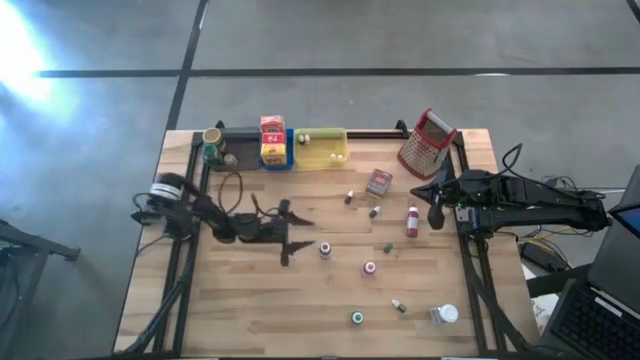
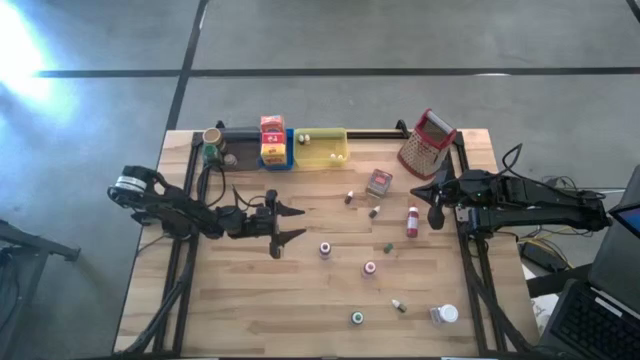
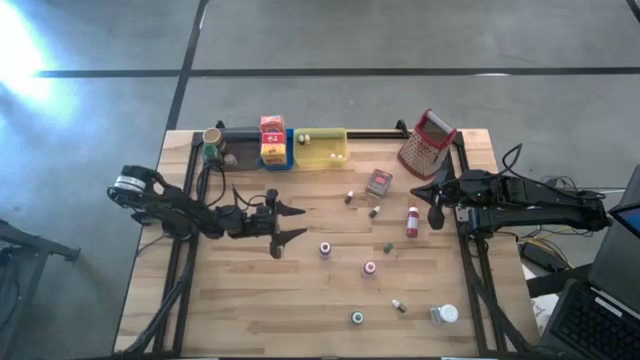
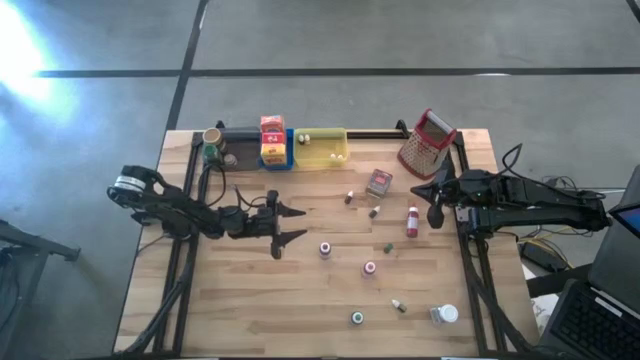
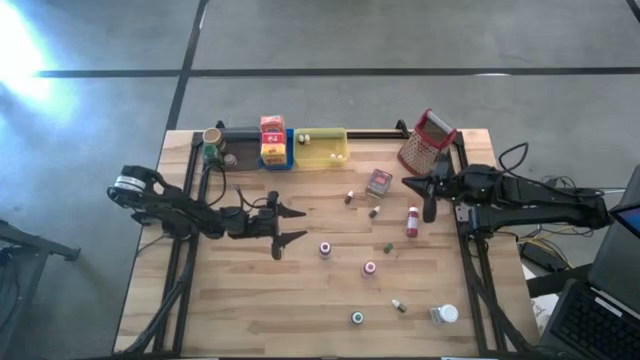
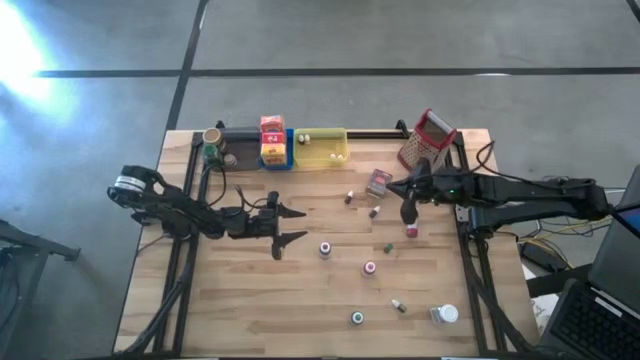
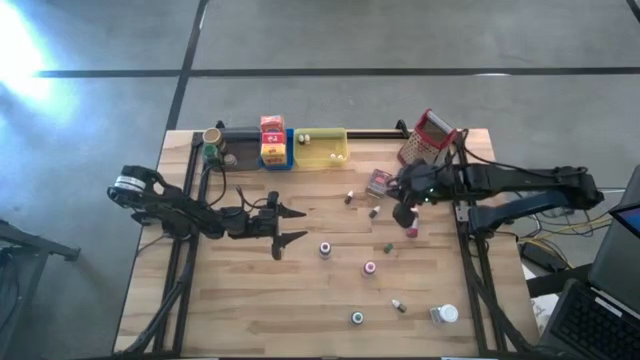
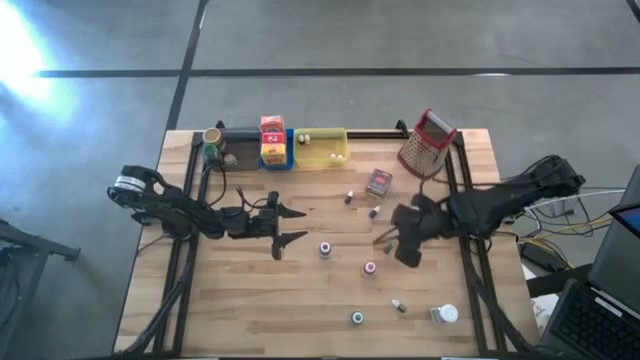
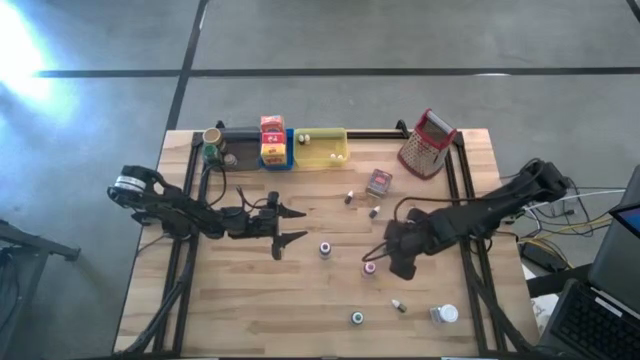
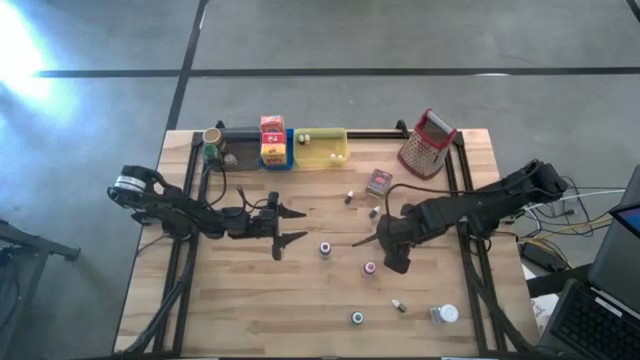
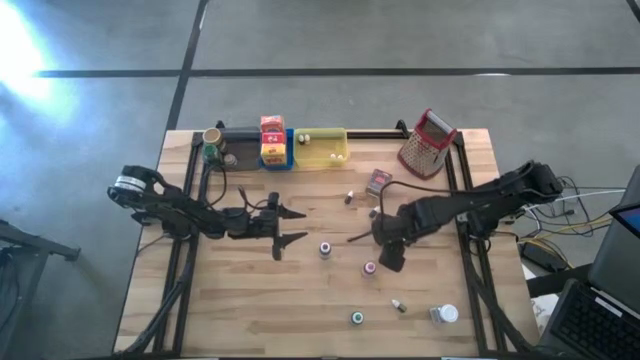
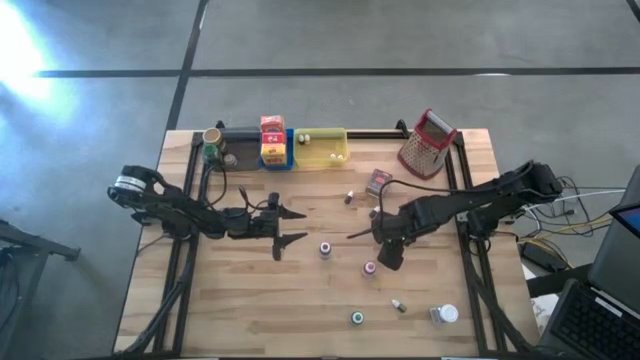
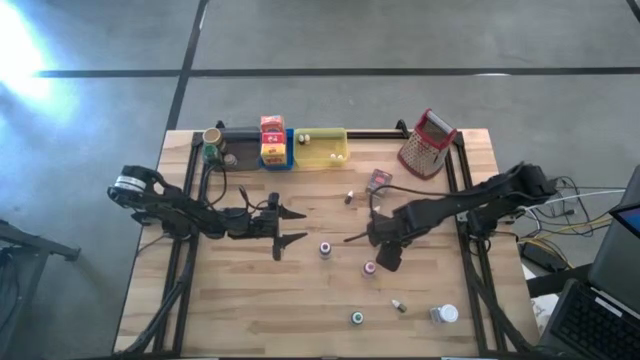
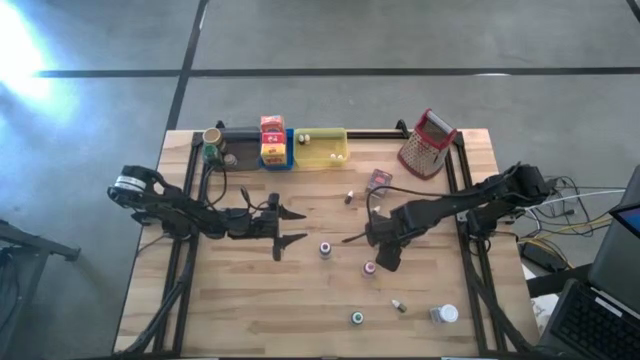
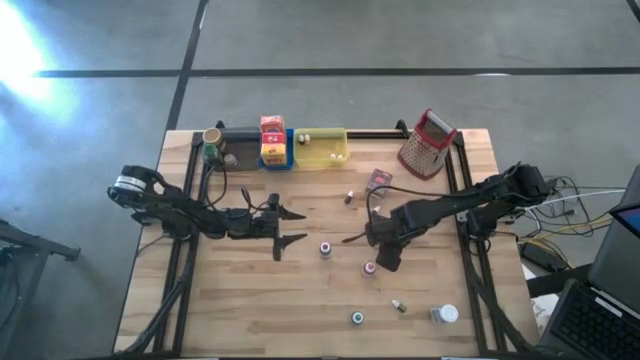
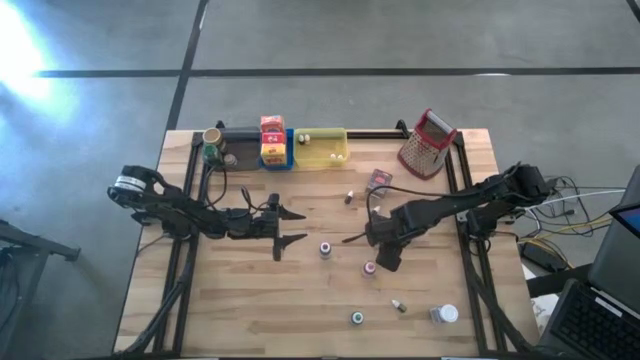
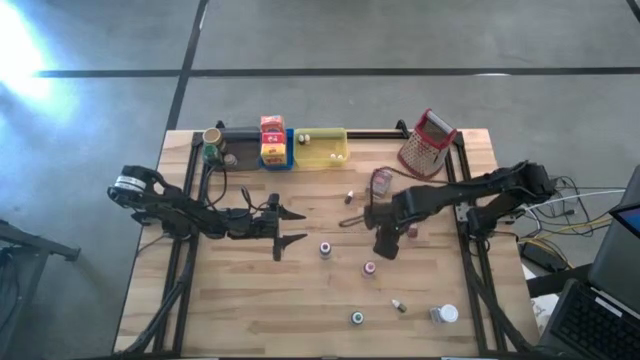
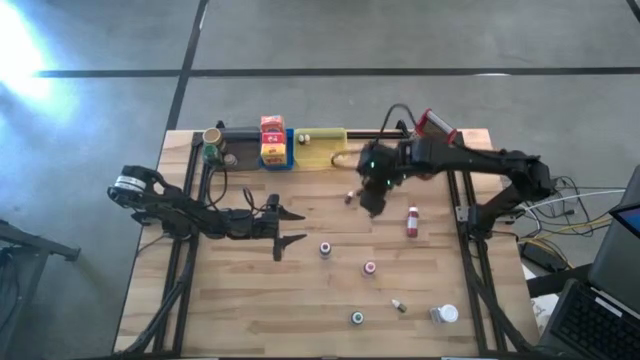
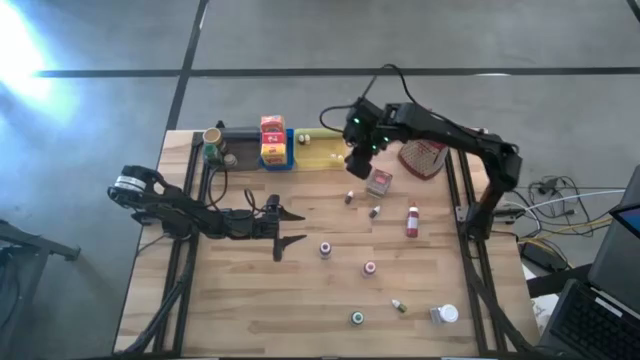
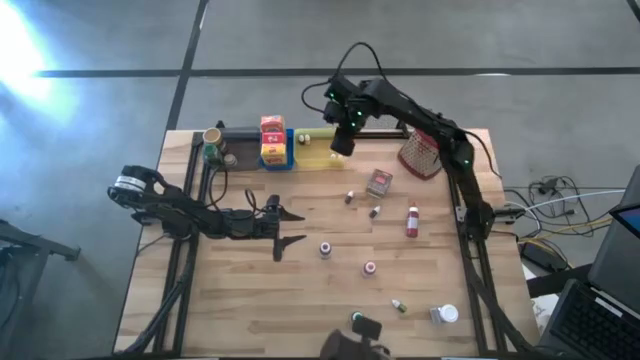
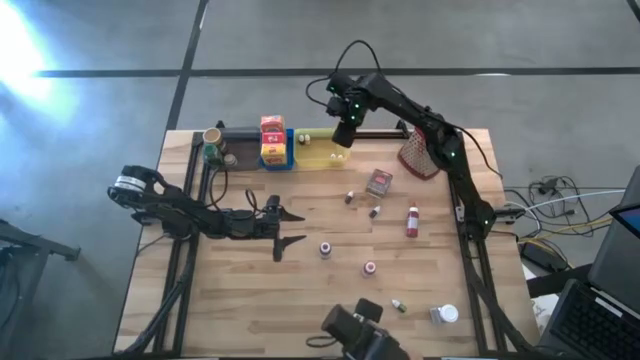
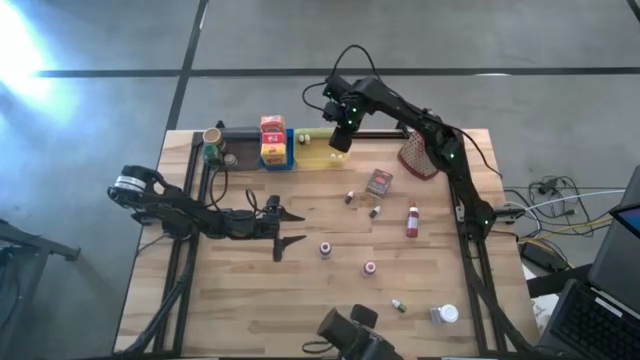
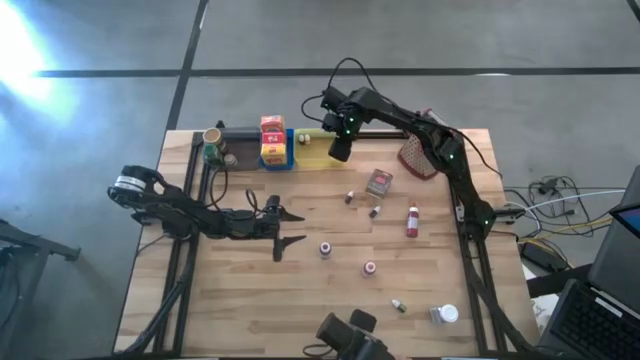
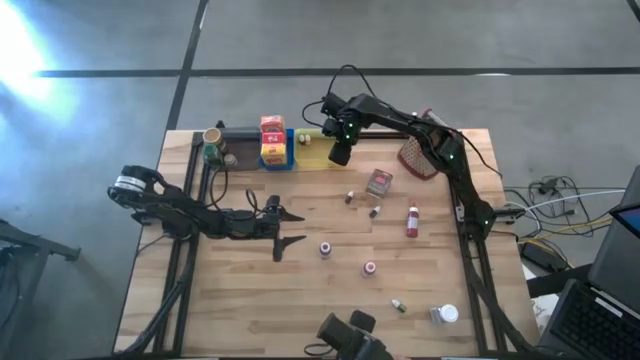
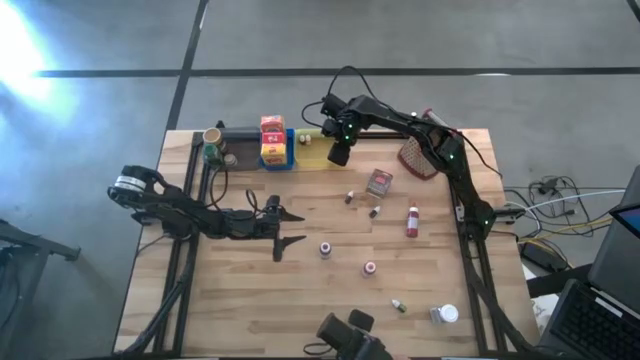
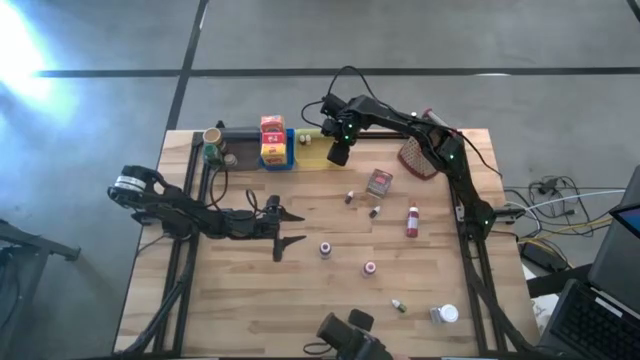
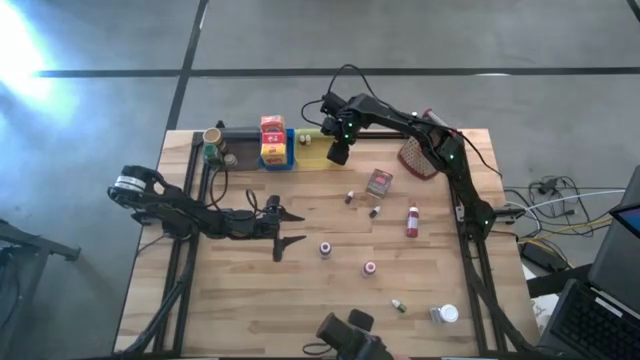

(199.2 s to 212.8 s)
Task: Pick & Place Kitchen Items
Put the small green food coloring bottle into the yellow bin

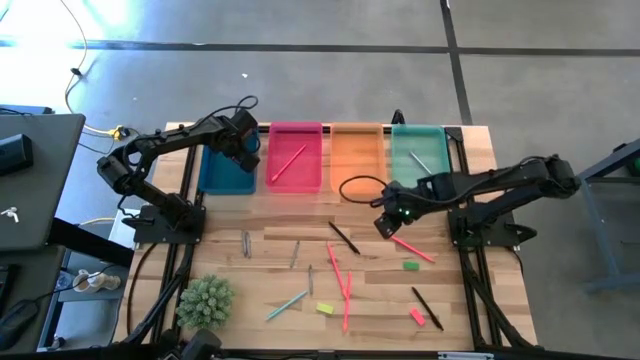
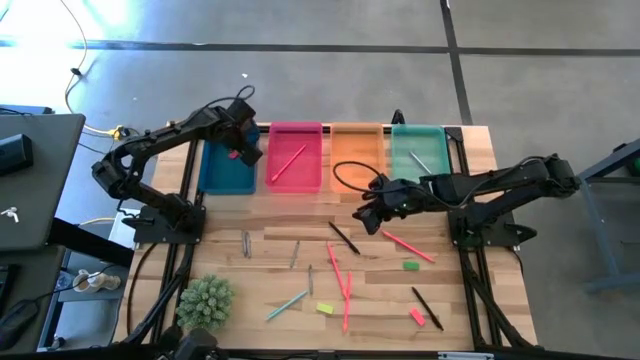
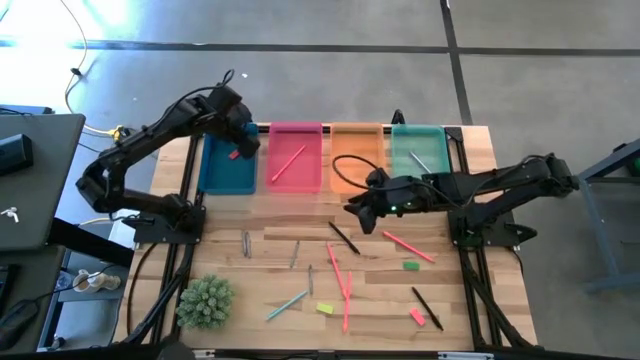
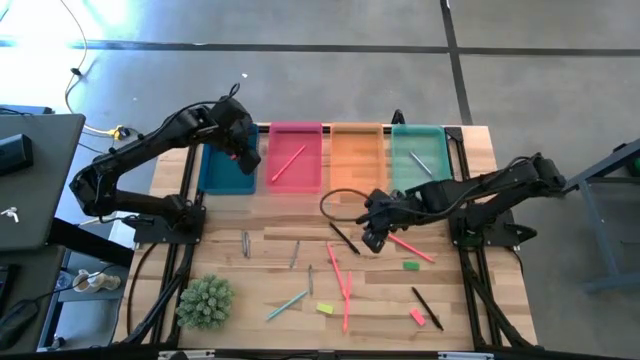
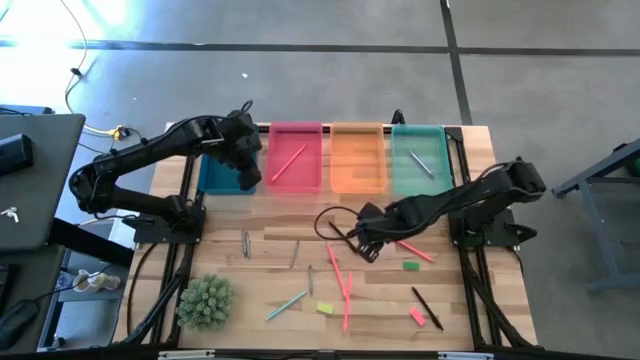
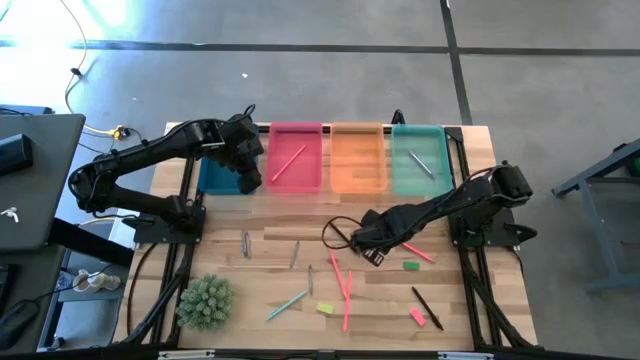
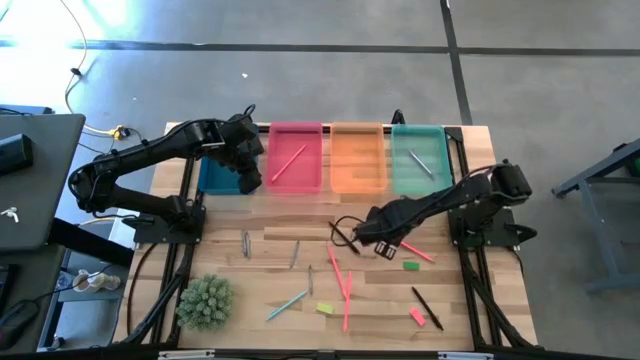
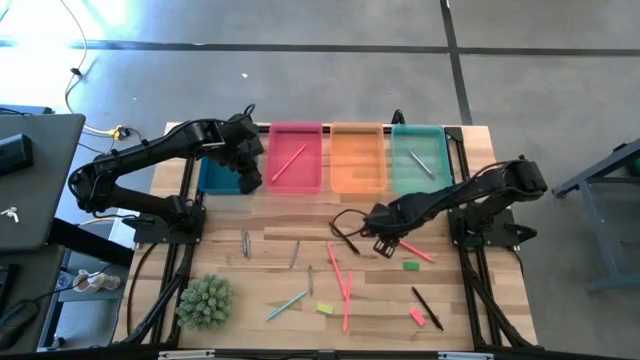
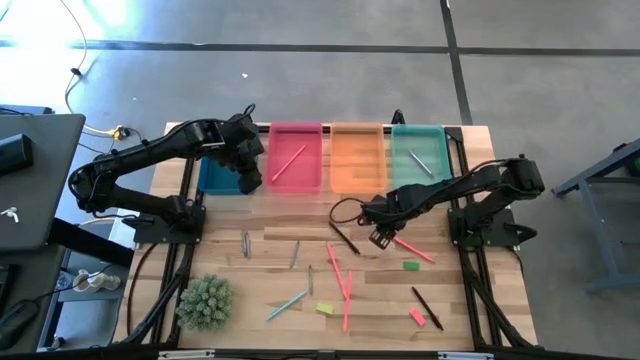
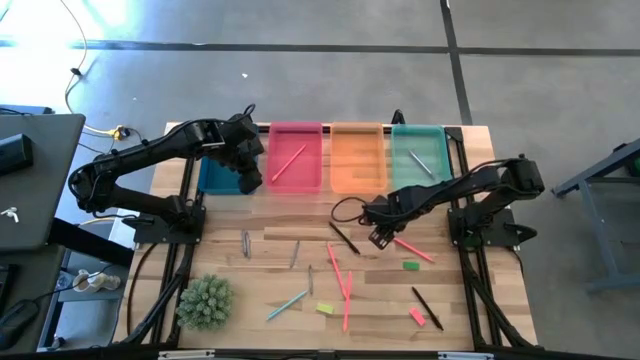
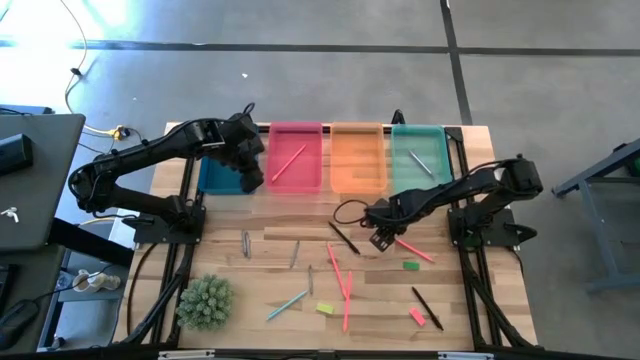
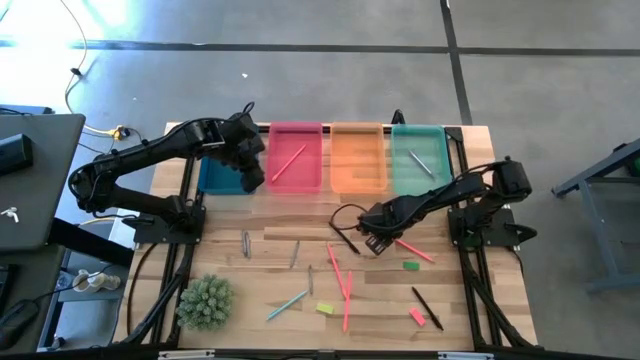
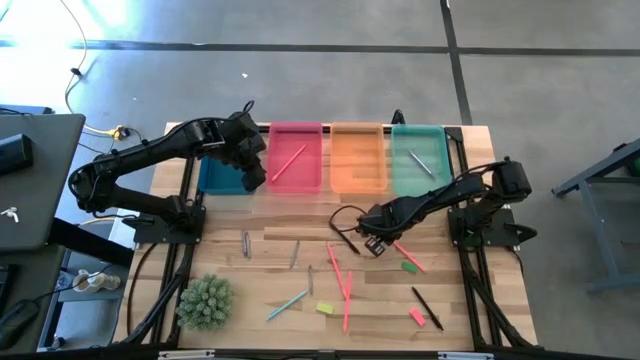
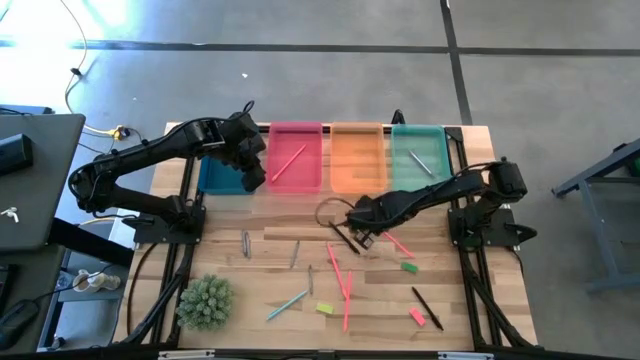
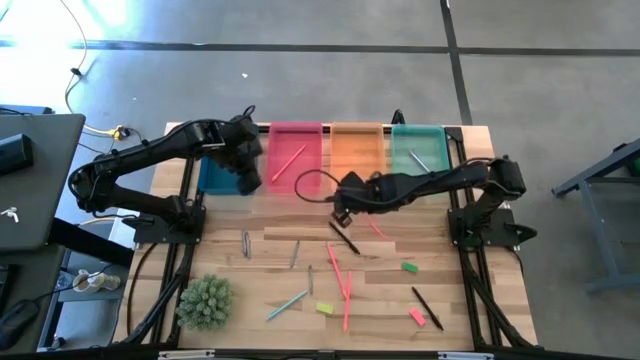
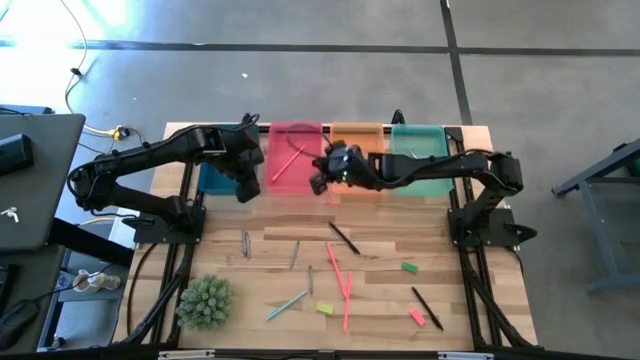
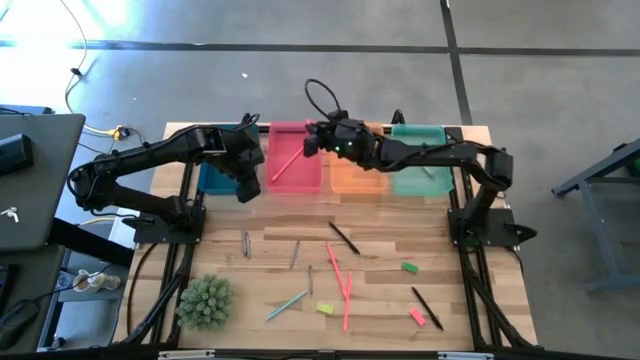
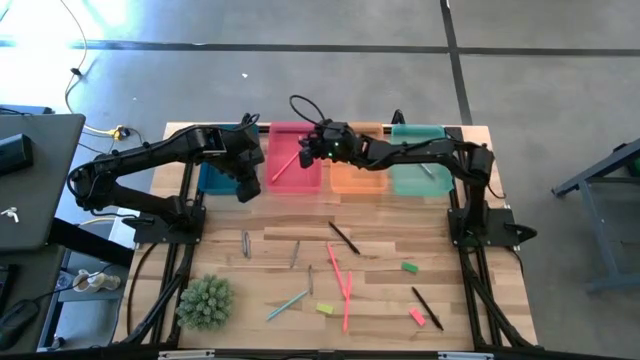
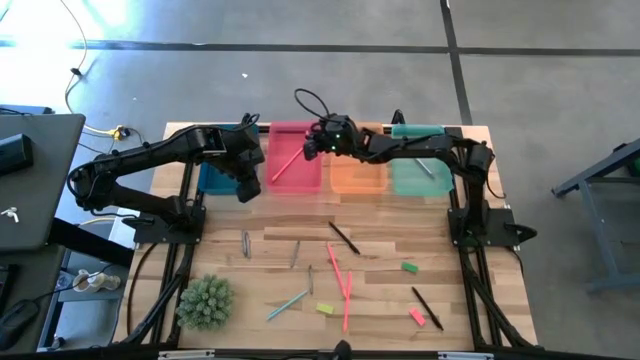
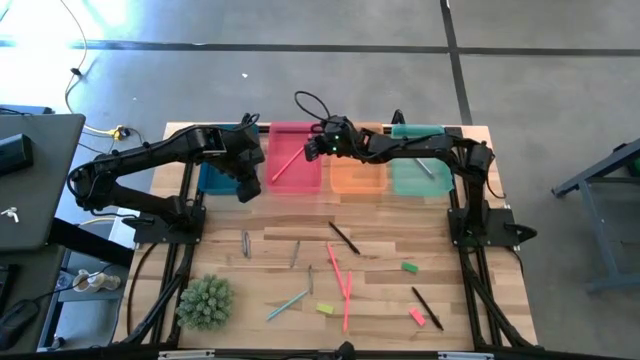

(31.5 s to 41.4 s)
Task: Sort crayons/erasers/pens/pencils in bins
Put the pink pencil into the pink bin
